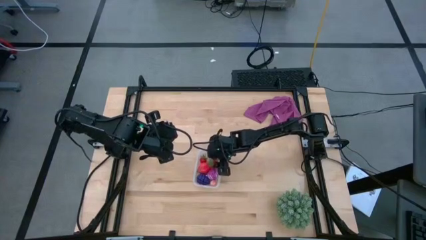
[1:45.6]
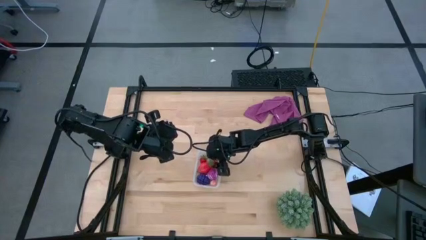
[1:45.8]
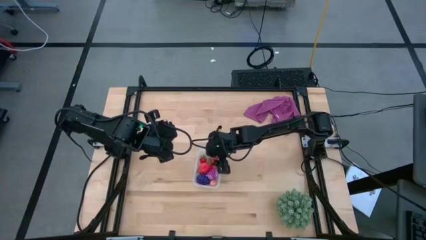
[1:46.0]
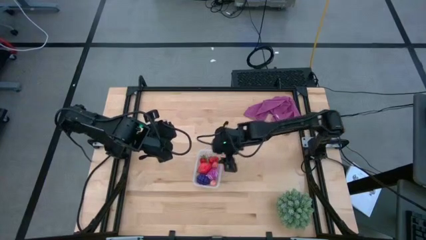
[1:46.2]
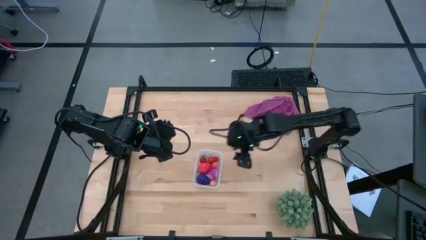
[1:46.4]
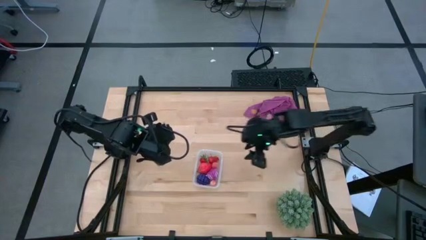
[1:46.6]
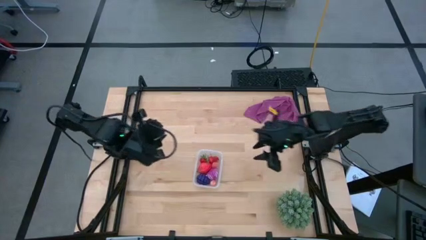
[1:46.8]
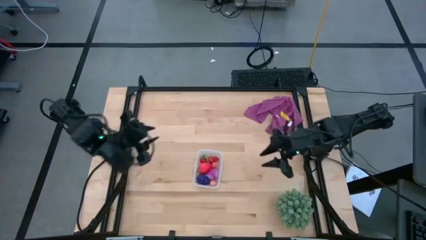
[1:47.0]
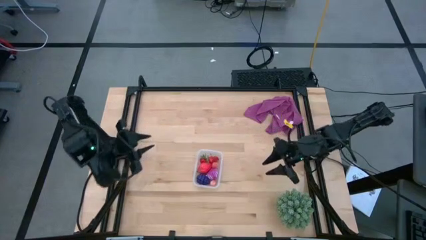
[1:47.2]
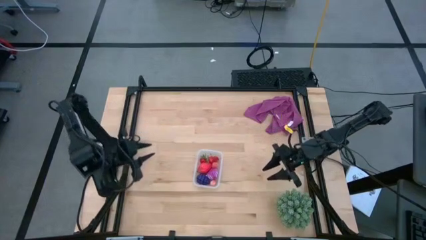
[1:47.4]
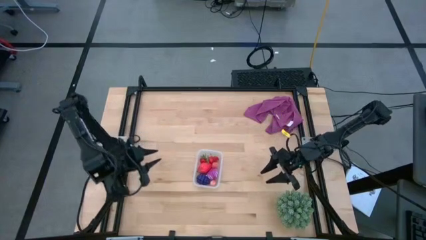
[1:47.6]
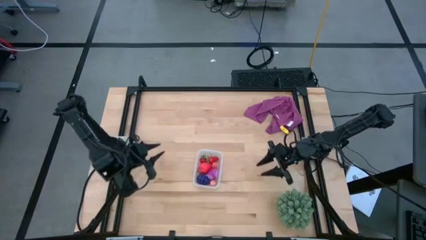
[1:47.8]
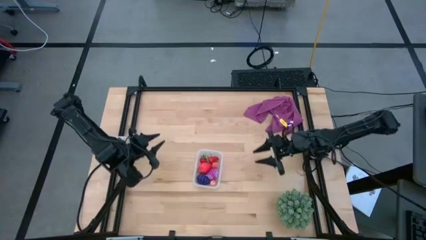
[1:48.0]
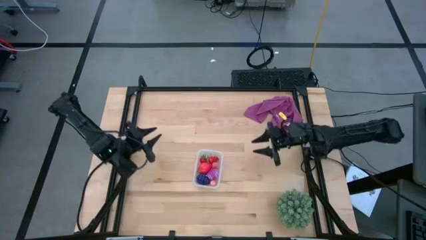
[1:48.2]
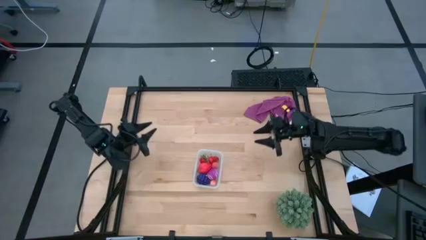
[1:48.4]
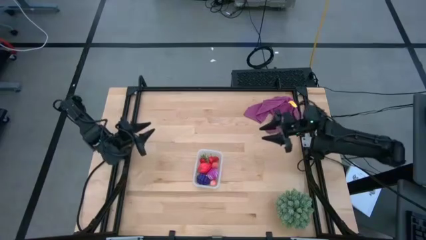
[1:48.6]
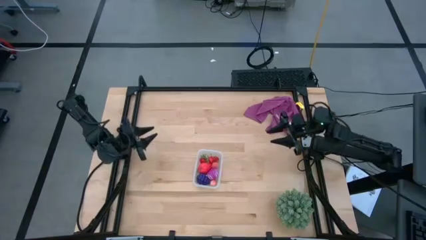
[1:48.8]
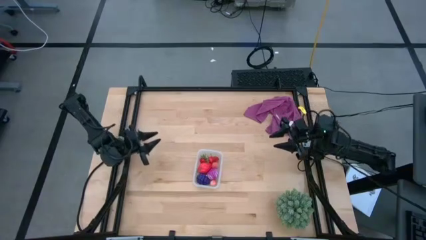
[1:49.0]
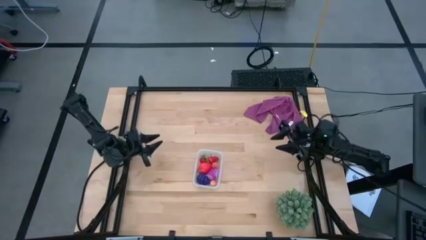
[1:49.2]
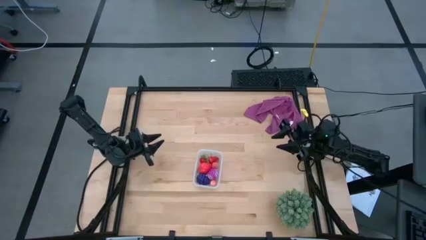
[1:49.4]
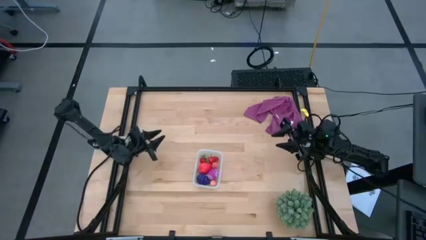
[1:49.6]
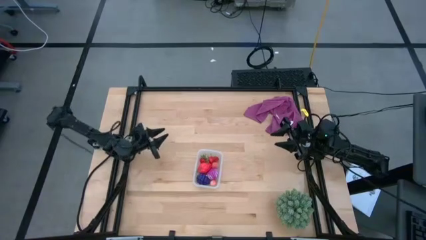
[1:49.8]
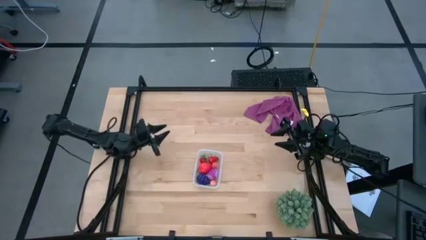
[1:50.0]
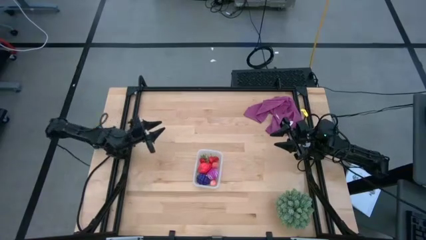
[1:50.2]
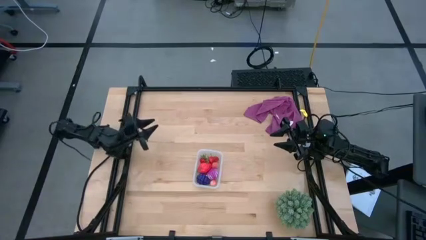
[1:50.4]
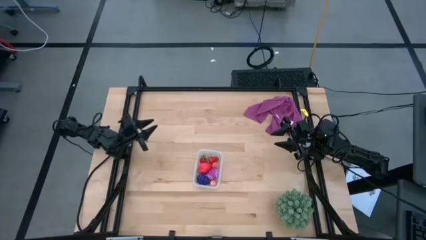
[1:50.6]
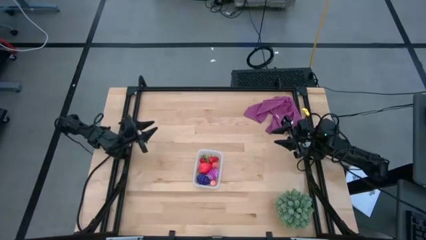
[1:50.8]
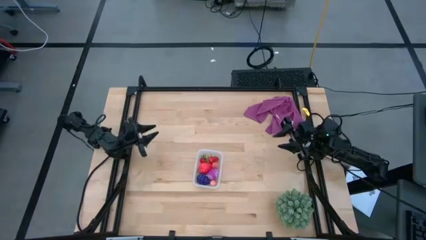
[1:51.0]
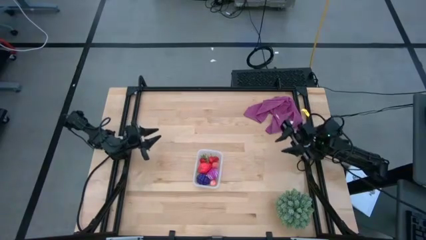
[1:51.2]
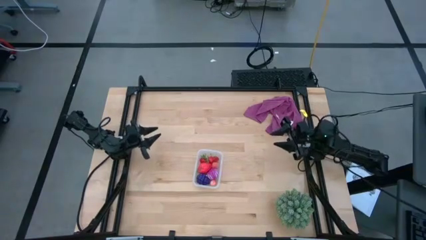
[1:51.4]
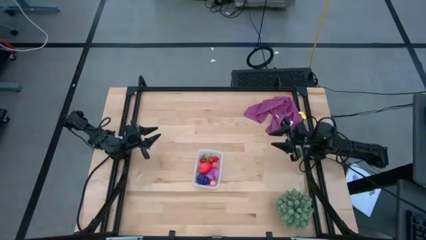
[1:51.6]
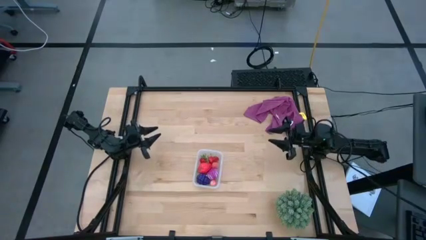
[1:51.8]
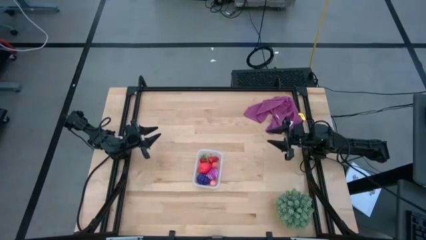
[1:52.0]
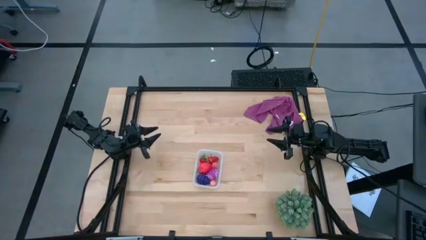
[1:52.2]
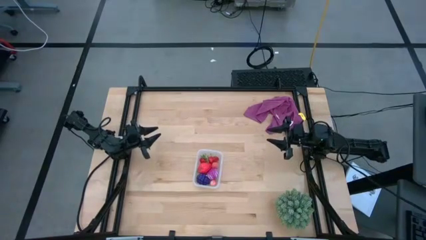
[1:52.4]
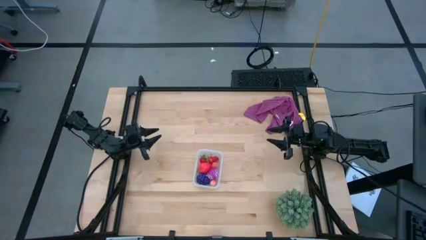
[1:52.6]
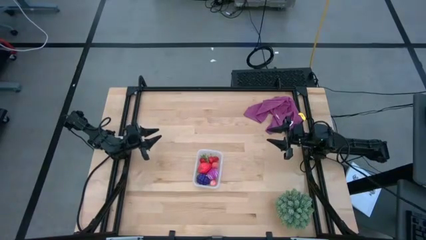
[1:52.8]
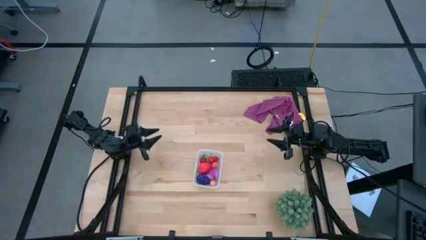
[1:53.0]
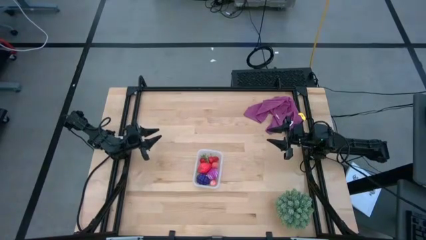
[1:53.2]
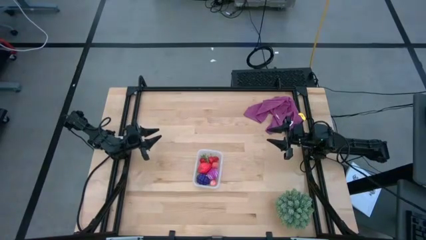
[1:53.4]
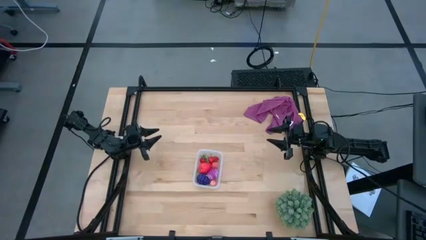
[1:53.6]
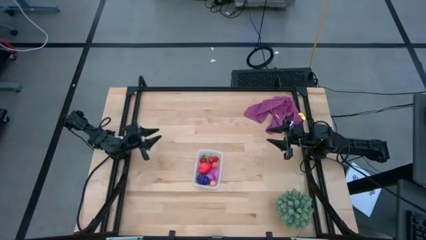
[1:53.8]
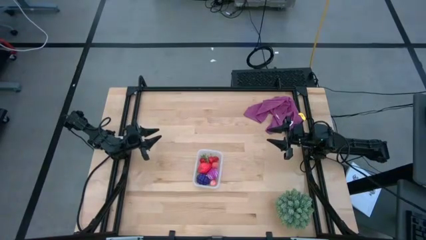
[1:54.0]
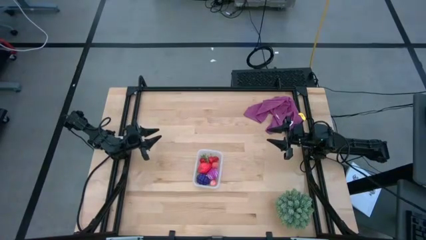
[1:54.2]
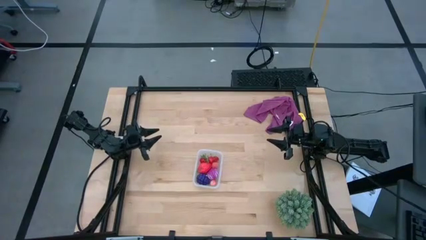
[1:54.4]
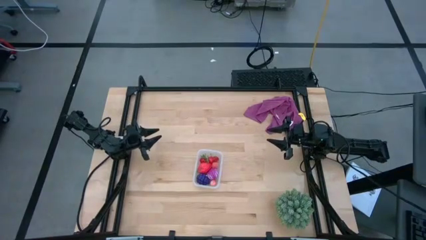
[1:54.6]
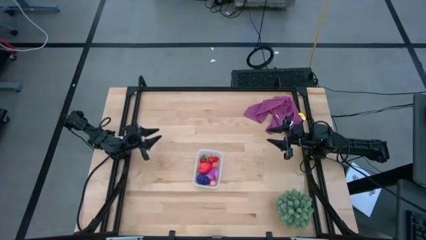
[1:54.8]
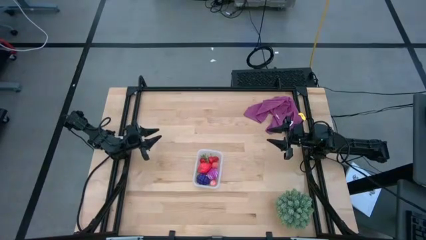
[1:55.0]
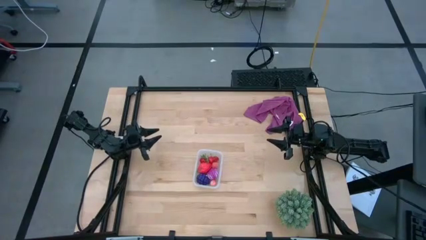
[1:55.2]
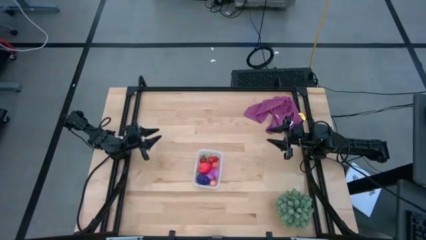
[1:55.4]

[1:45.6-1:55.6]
Task: Pick and placing Produce into tupperware
Return to Home Position
